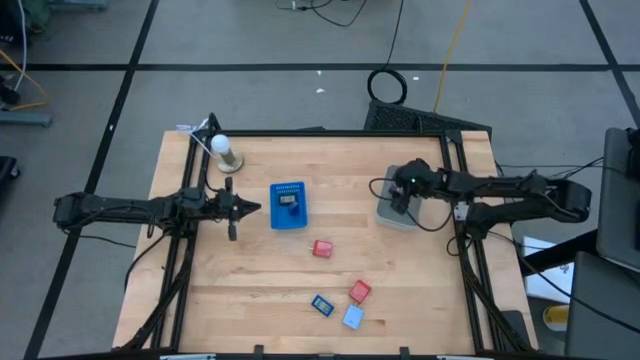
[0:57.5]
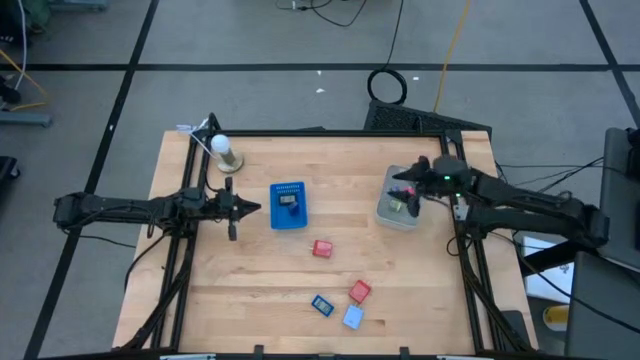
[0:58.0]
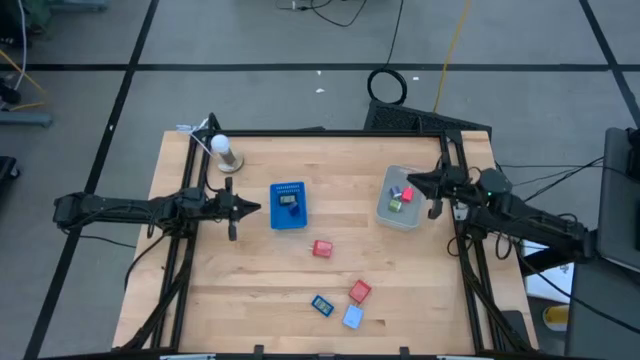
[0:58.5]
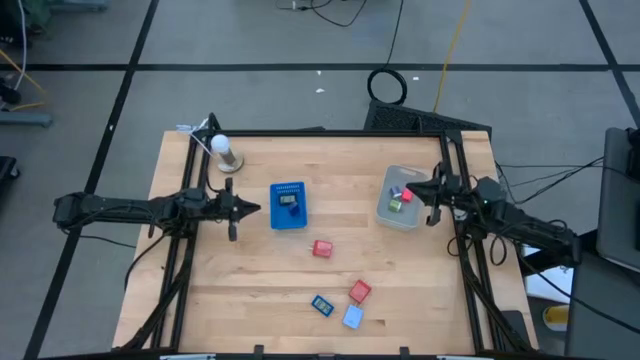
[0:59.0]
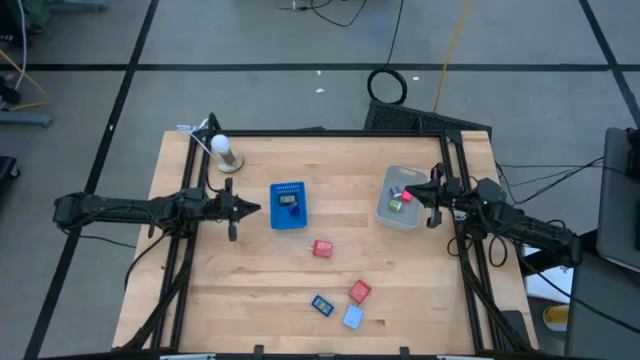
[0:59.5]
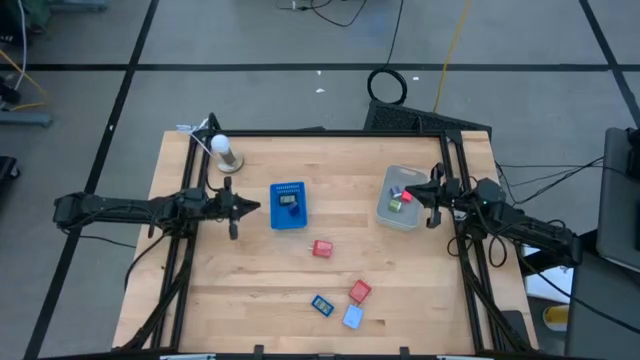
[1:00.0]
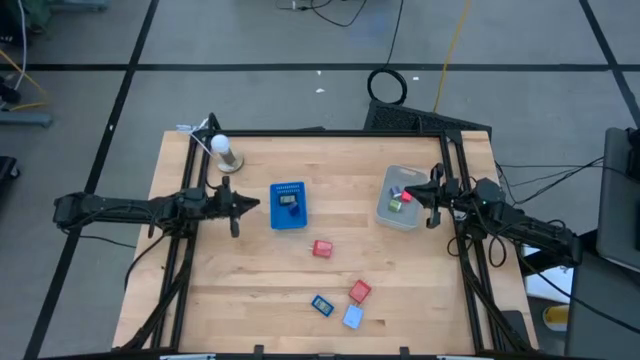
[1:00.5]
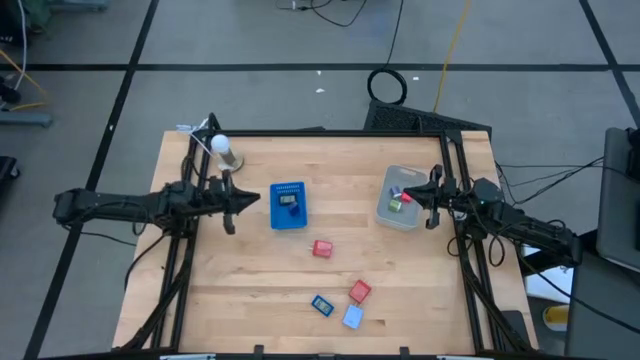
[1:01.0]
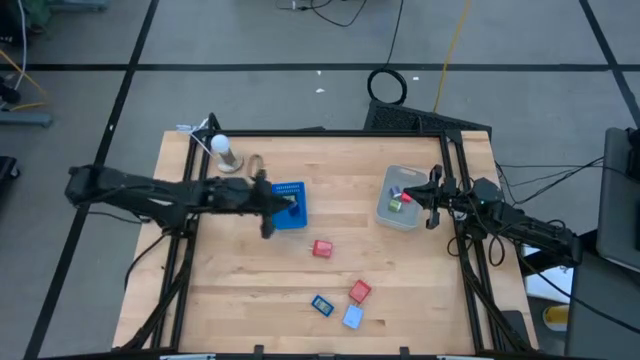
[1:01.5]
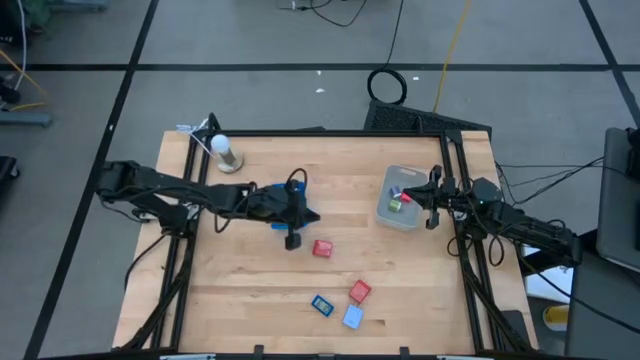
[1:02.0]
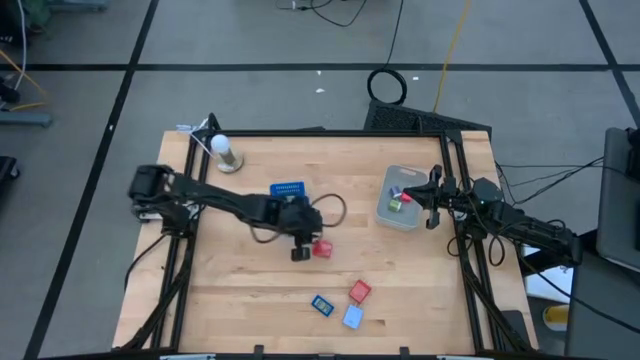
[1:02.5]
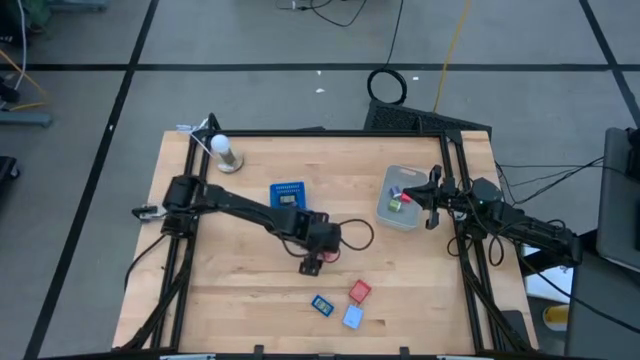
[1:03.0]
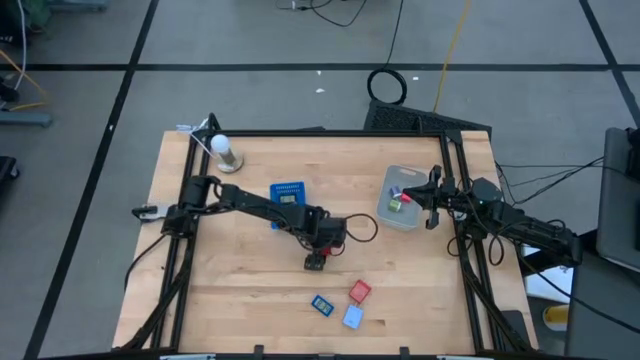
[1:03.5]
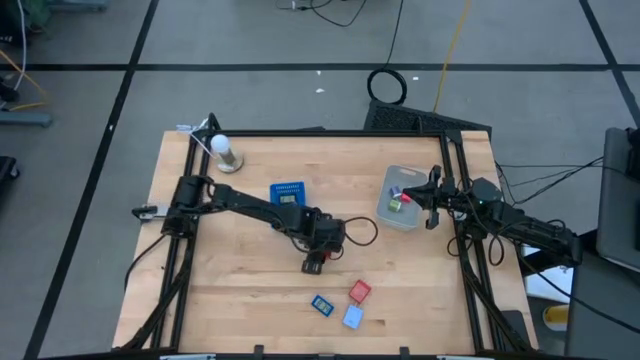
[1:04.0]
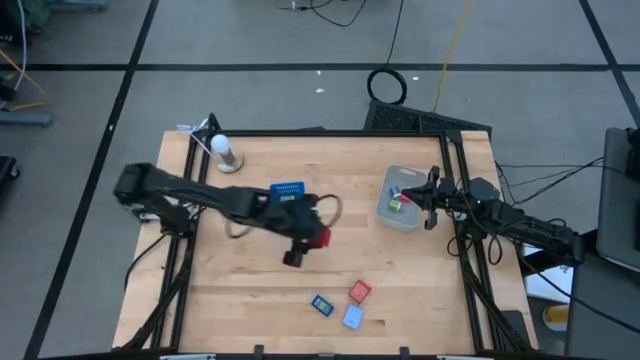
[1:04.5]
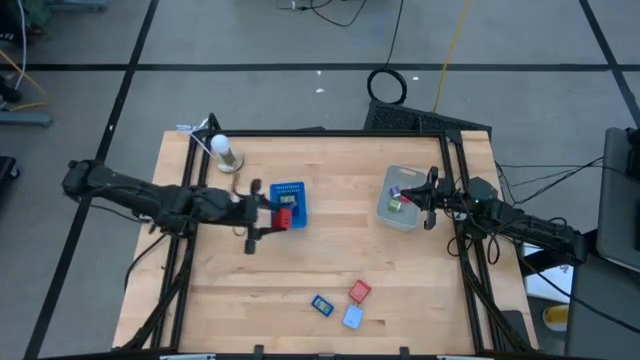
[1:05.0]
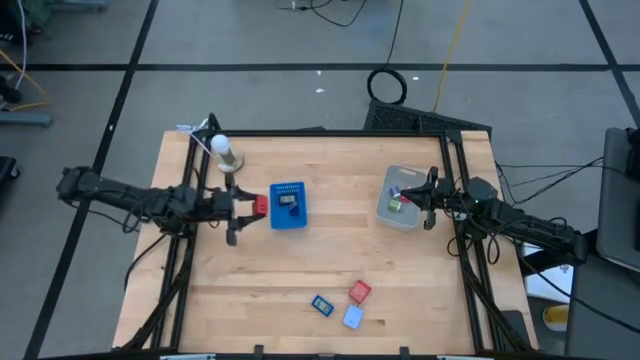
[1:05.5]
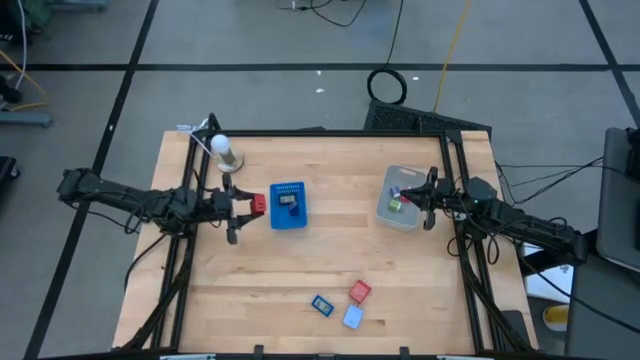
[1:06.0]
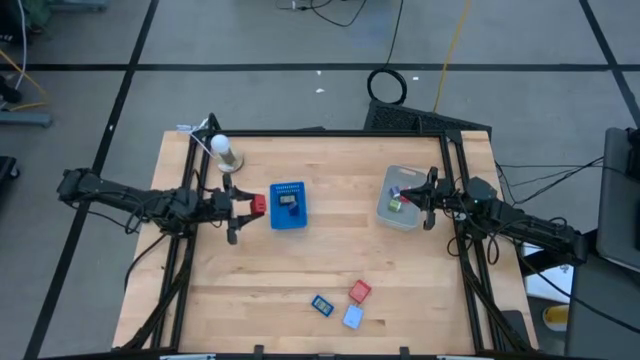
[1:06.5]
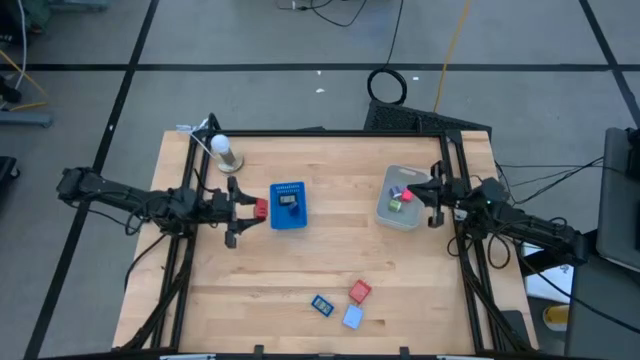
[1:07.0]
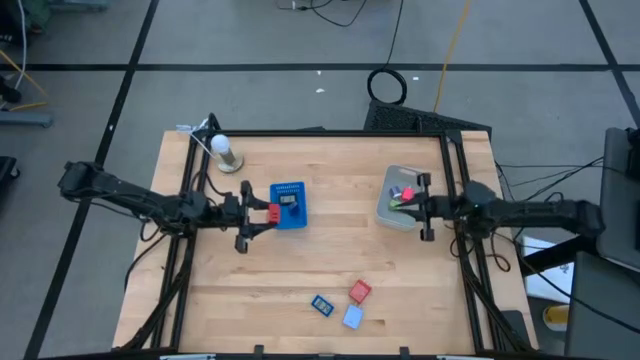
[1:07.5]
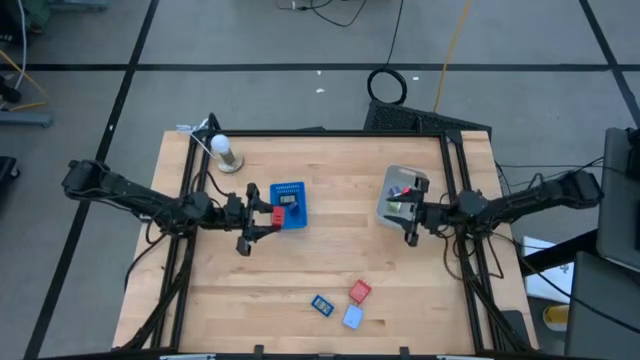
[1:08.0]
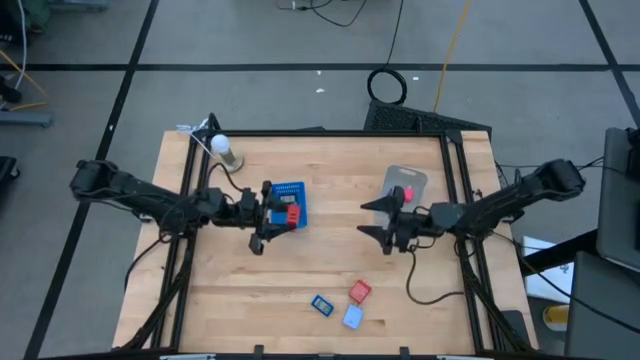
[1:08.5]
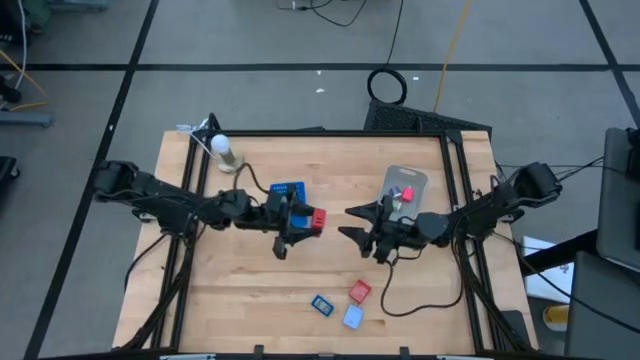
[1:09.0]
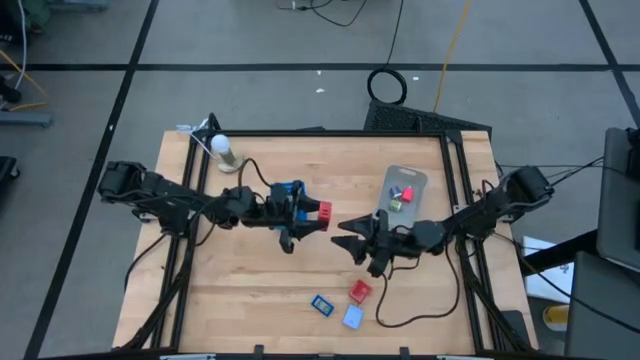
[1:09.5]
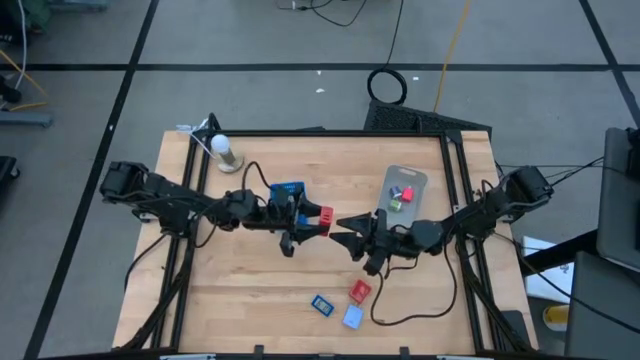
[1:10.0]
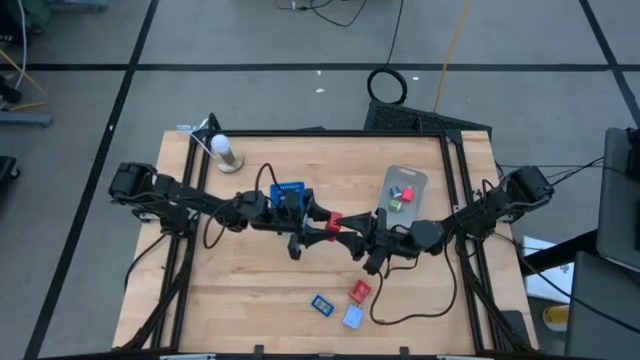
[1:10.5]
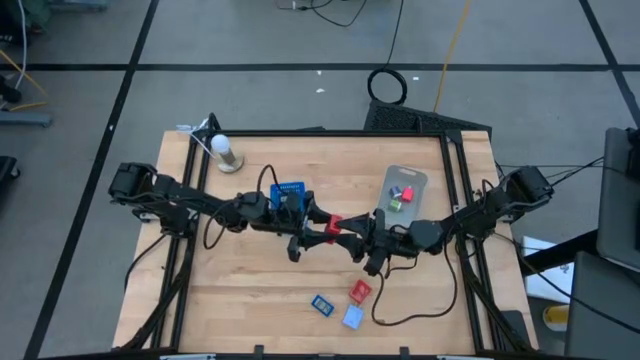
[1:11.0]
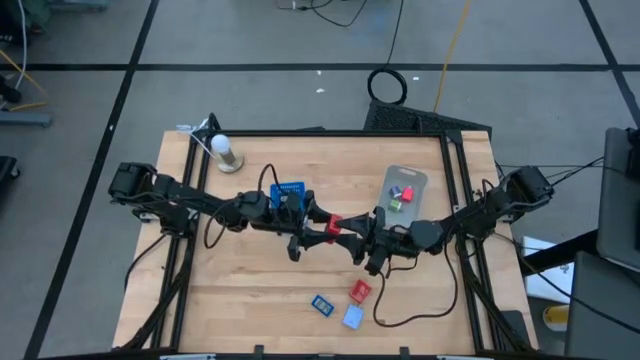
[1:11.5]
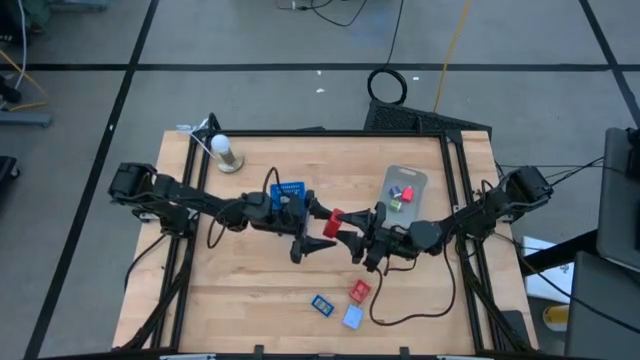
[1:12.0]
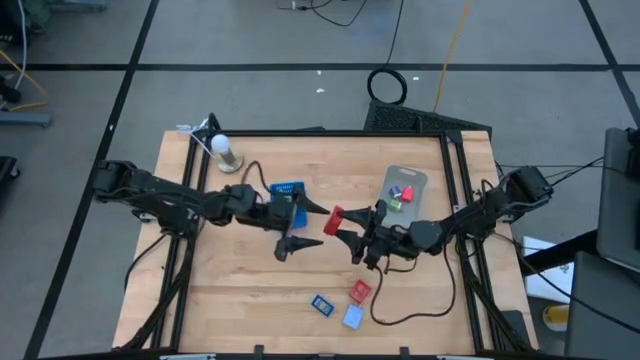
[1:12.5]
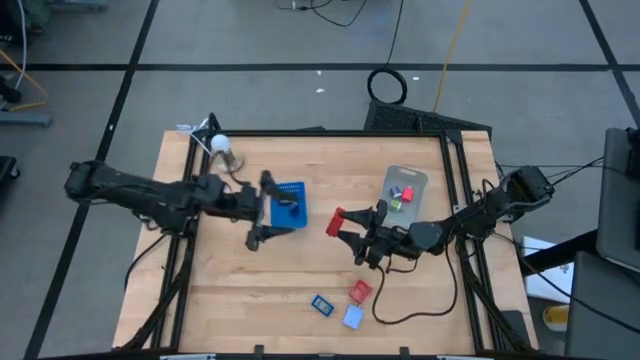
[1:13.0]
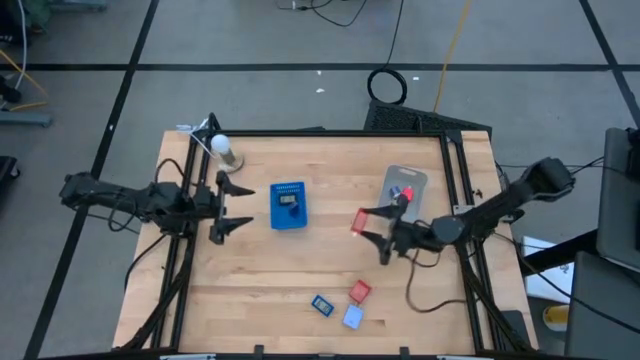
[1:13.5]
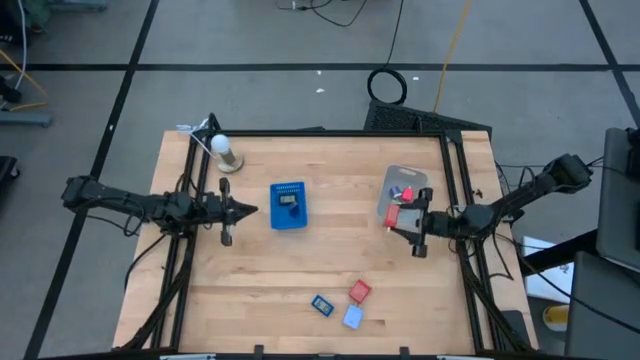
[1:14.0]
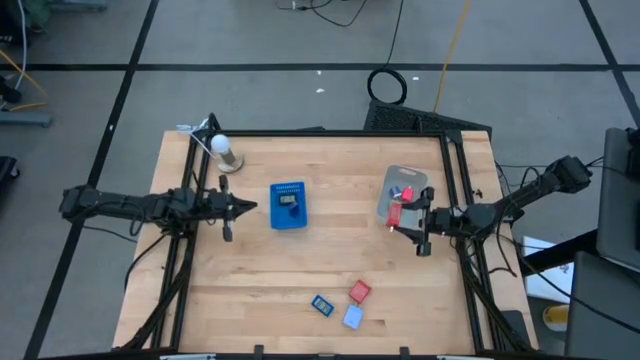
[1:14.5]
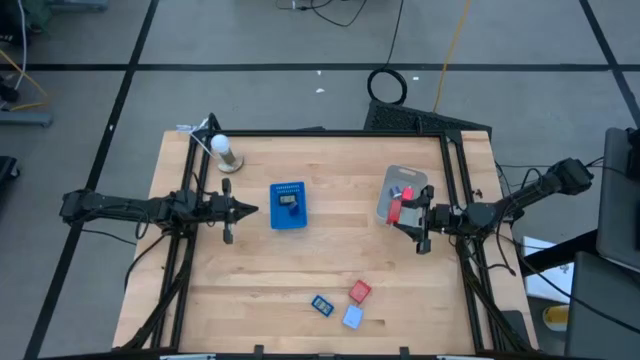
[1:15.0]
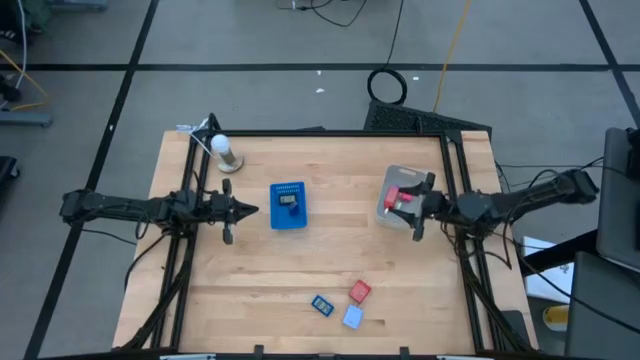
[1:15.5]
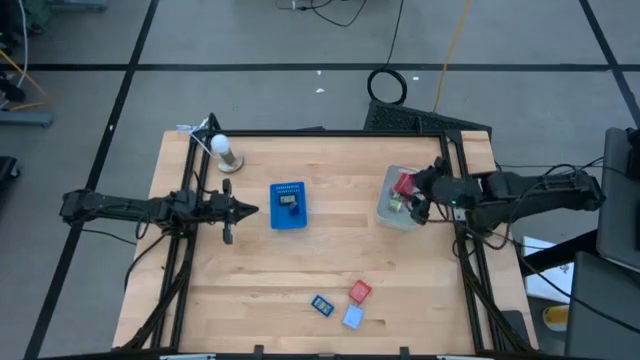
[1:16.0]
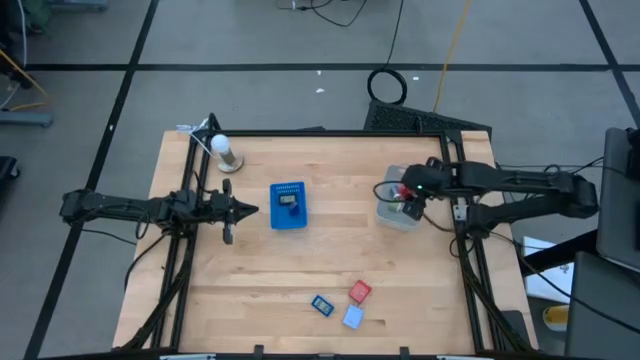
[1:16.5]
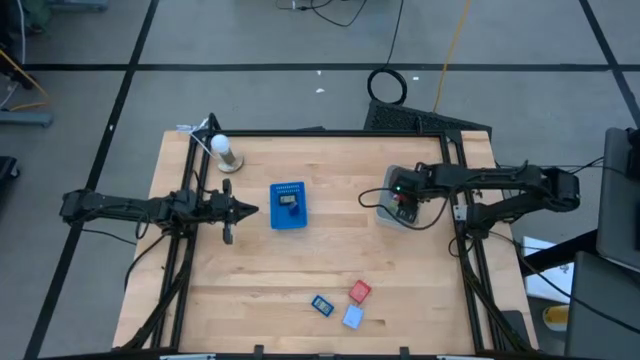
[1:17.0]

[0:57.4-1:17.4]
Task: Pick & Place Office items
Put the top red charger adapter into the white bin
